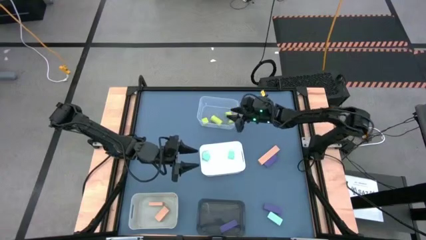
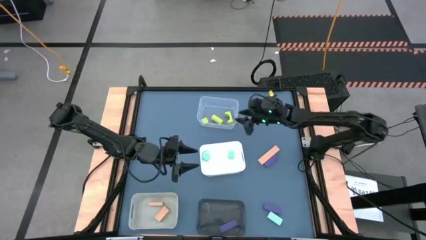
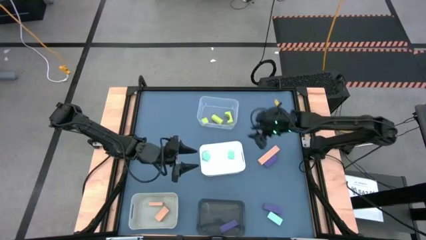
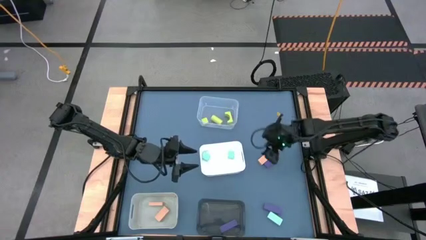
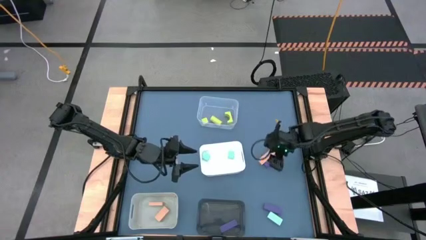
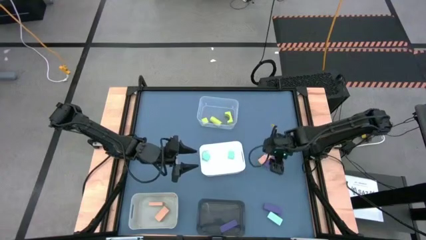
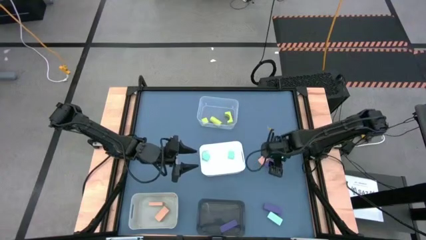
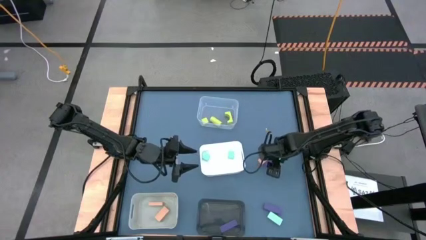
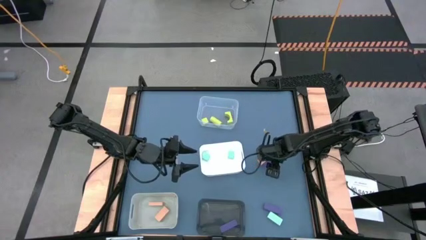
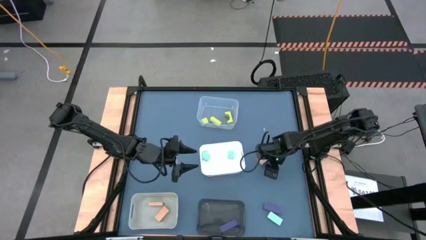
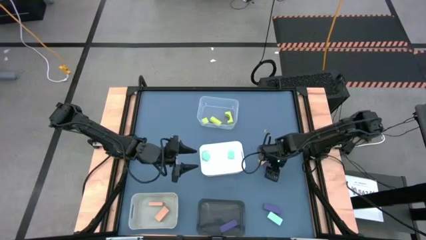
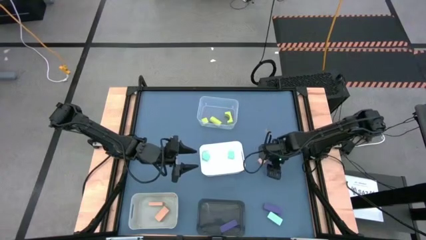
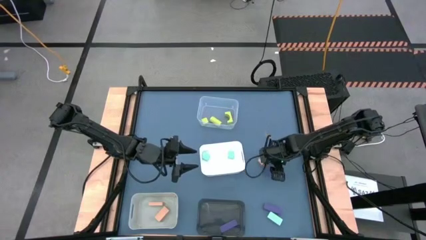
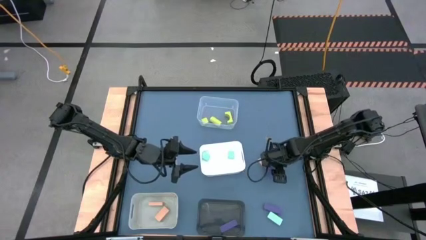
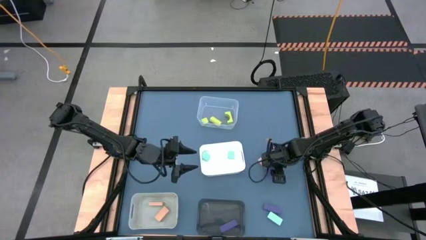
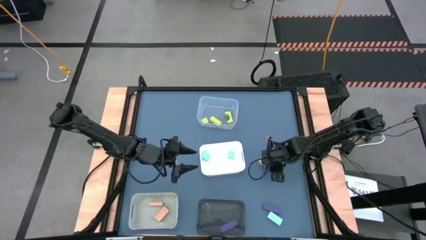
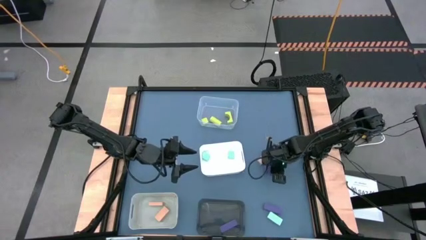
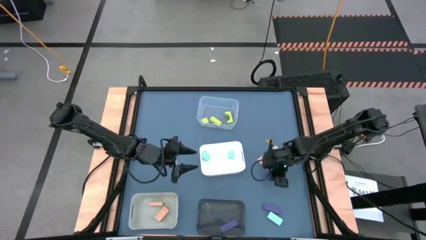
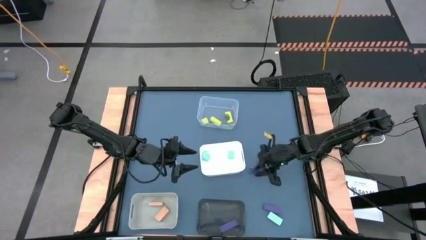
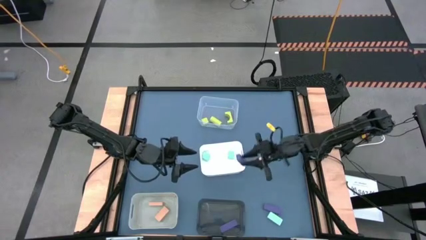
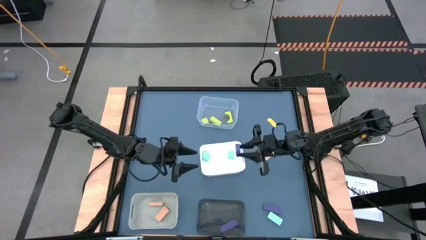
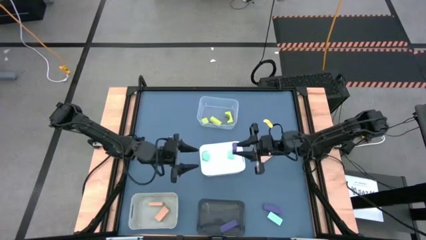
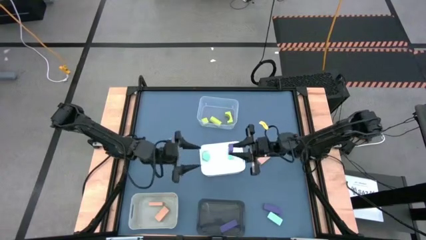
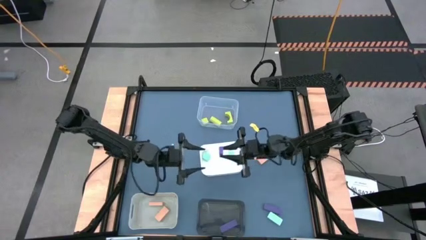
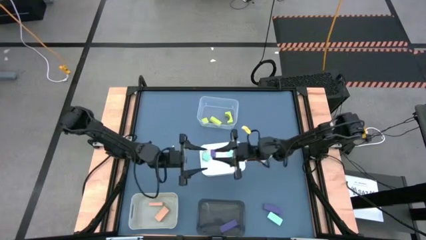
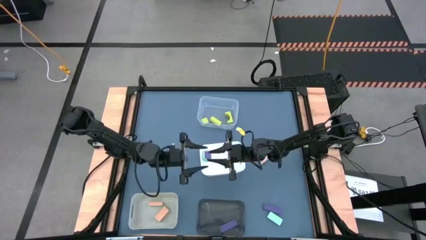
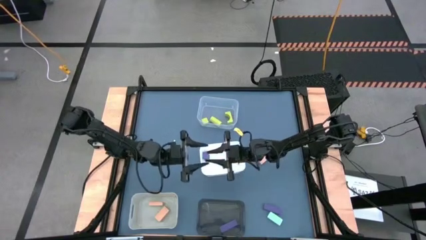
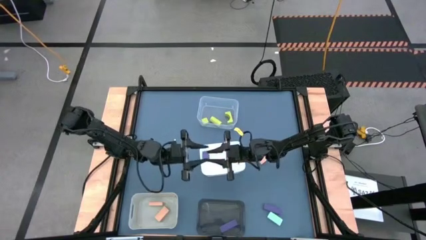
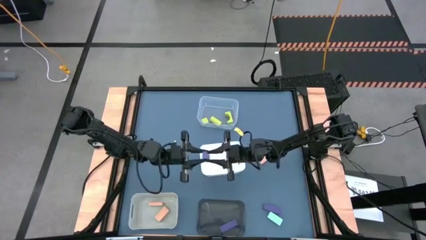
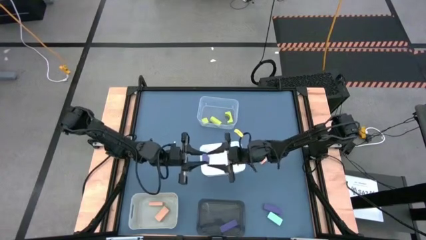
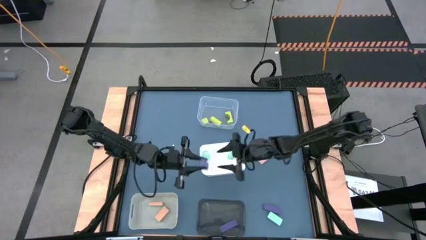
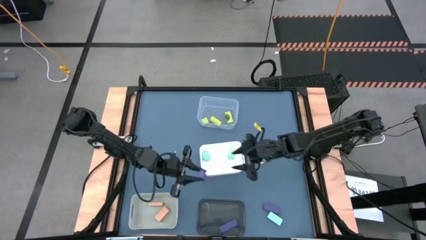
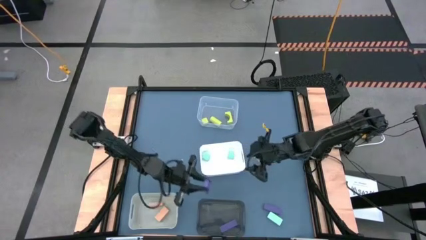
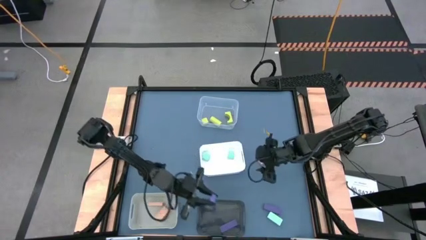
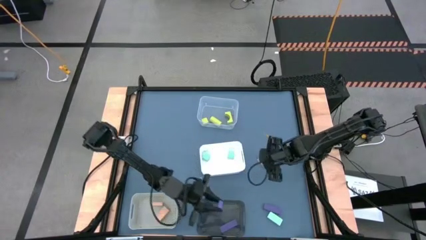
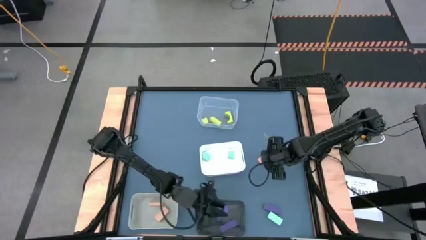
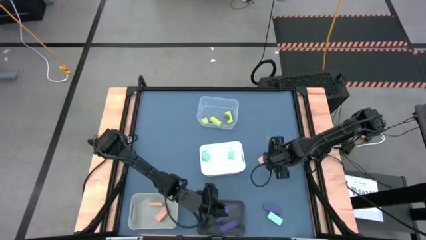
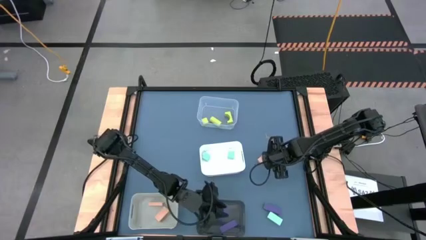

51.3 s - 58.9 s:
Task: Sort & place blocks by color
Put the top violet block into the black bin

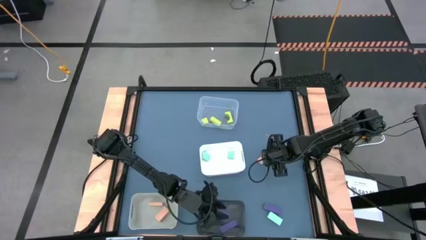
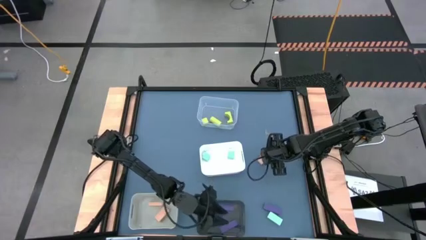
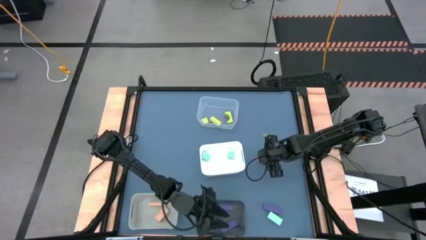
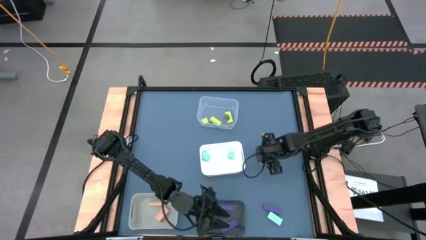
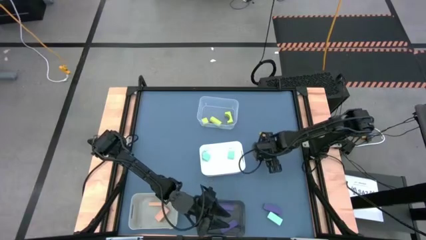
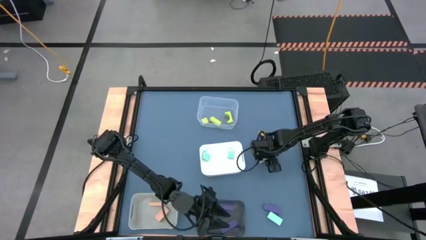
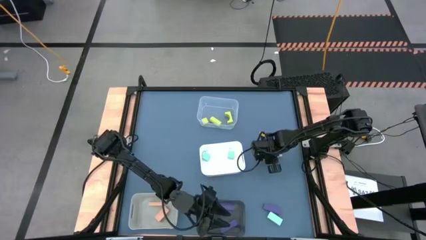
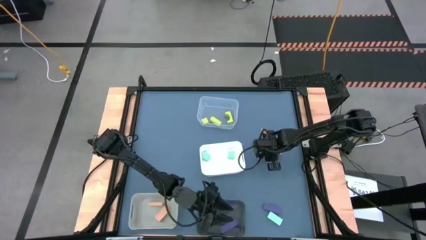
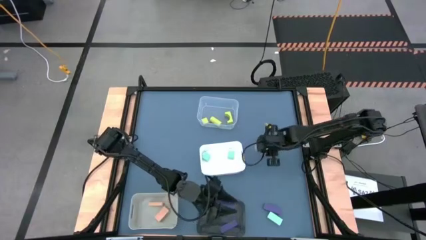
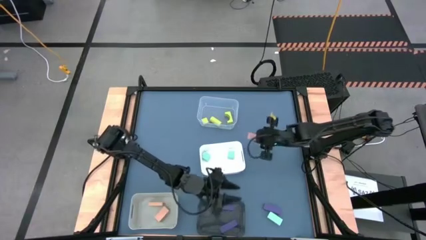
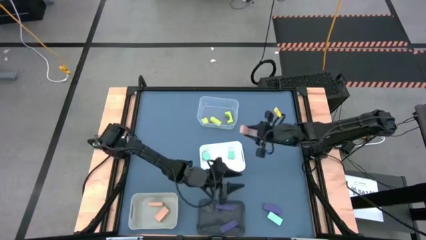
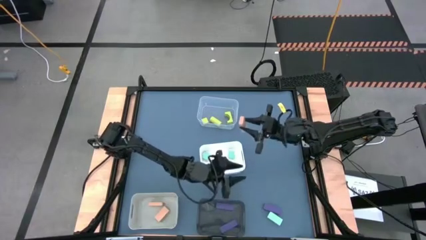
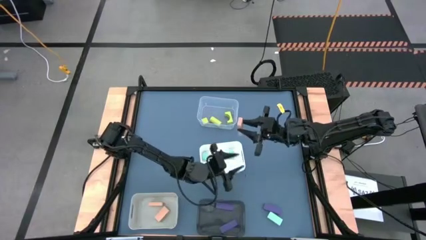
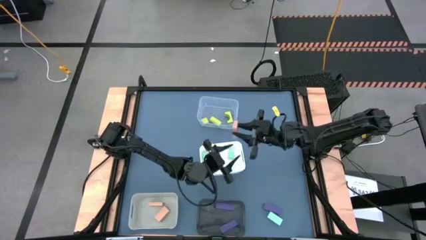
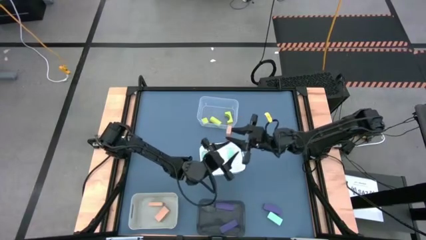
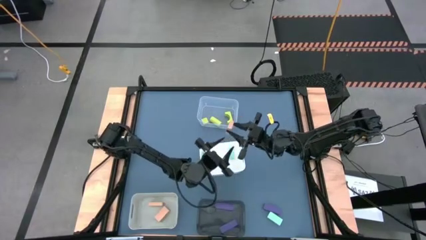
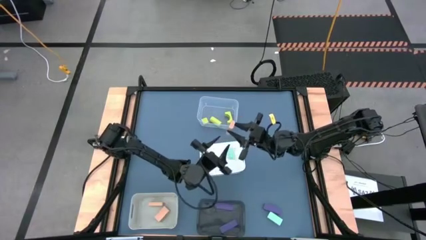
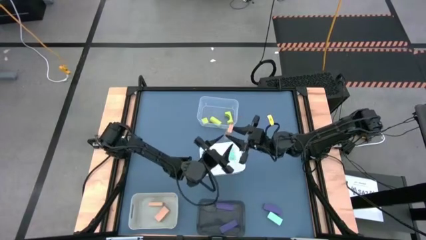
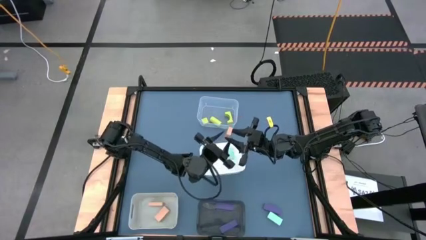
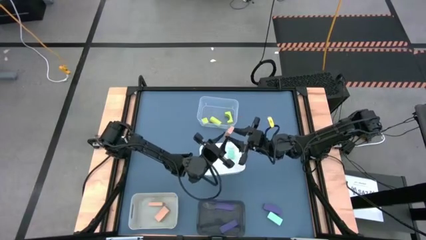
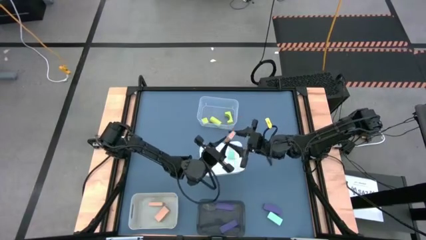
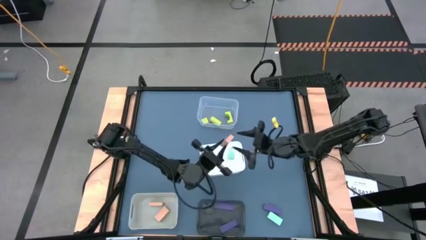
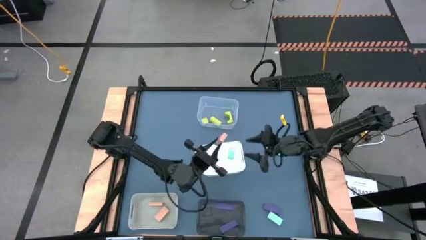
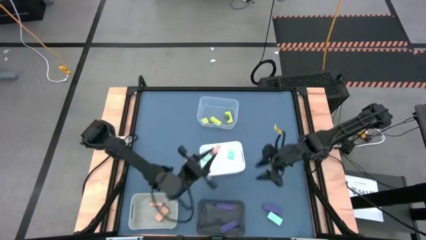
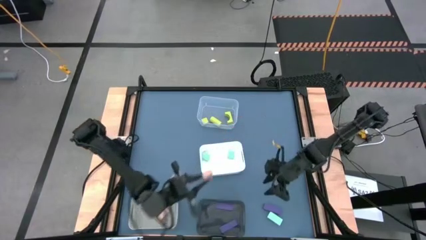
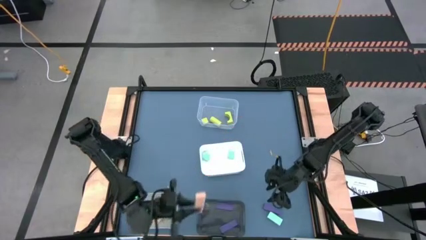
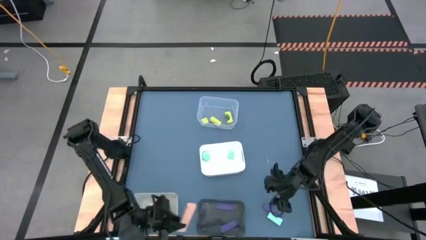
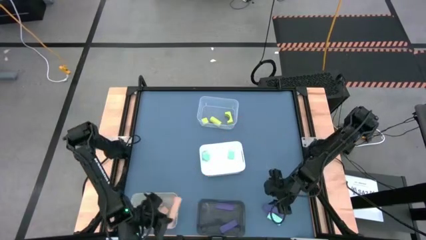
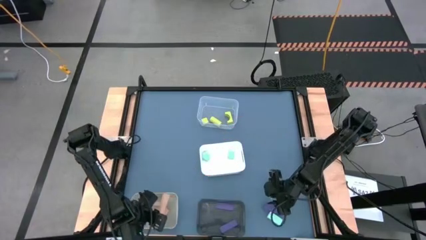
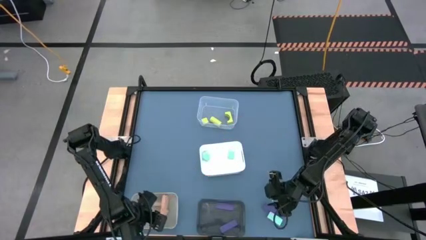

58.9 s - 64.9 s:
Put the brown block into the light gray bin

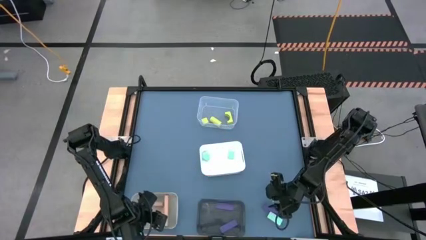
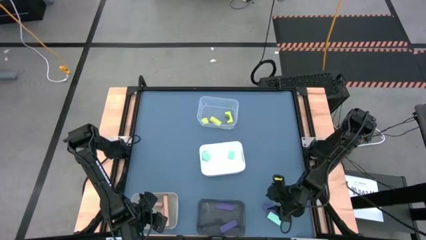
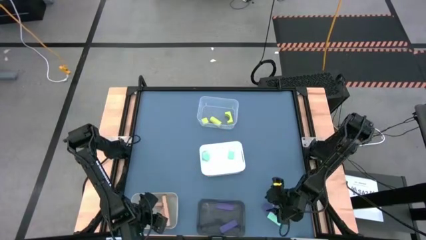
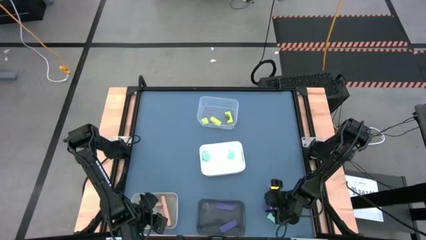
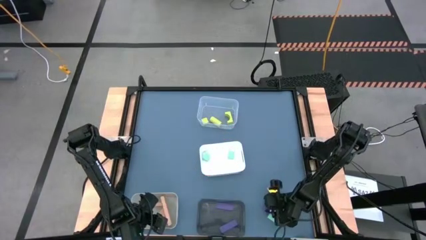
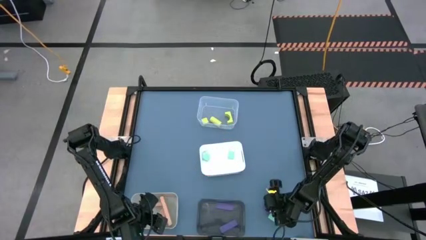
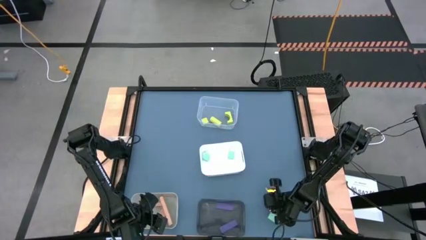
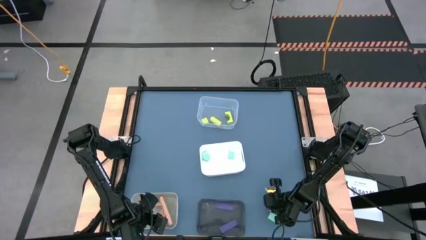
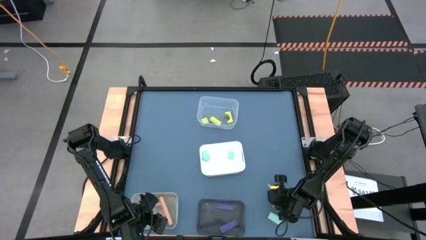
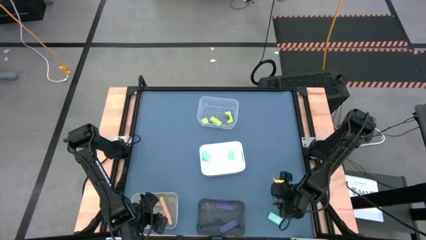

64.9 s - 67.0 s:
Put the violet block into the black bin

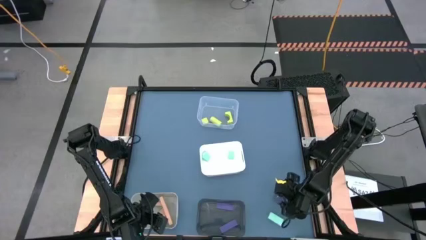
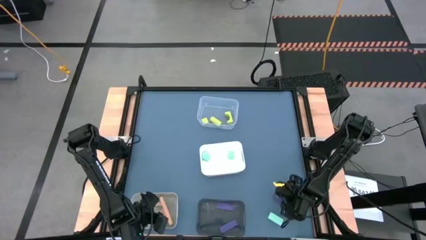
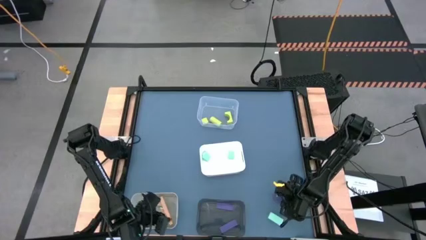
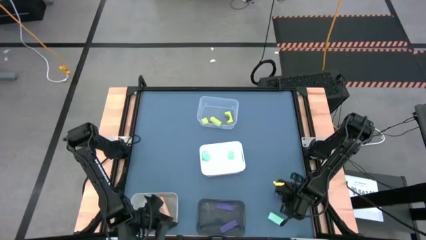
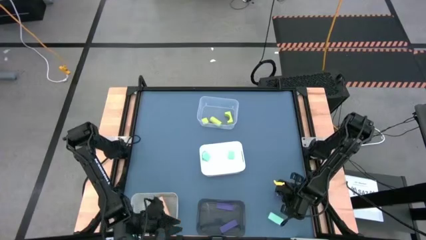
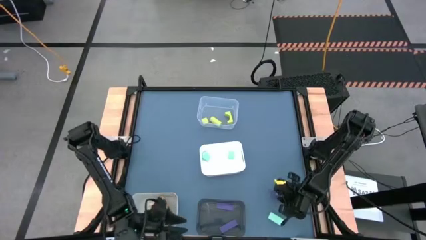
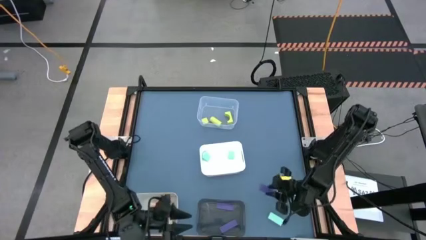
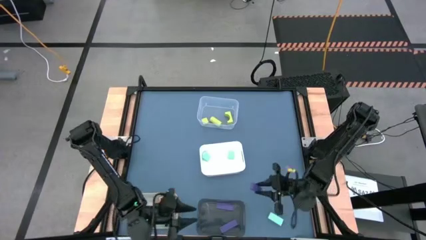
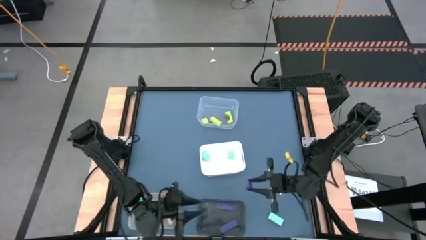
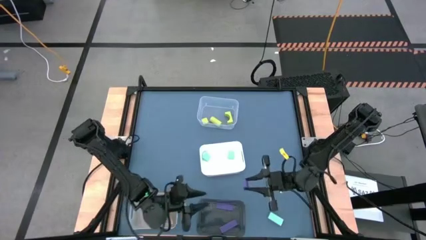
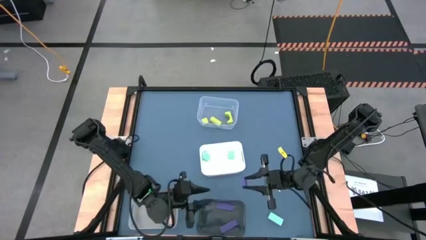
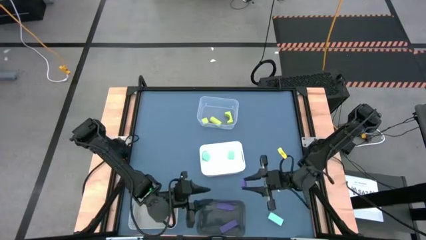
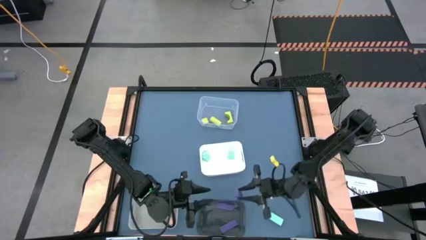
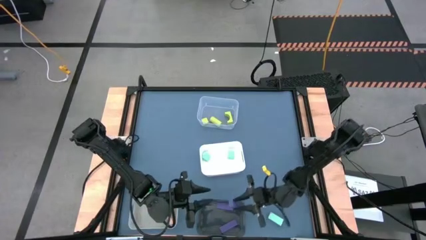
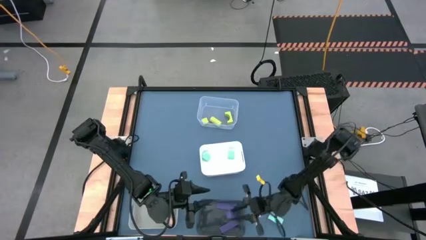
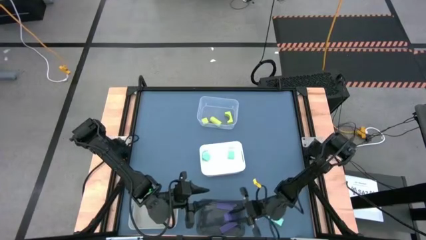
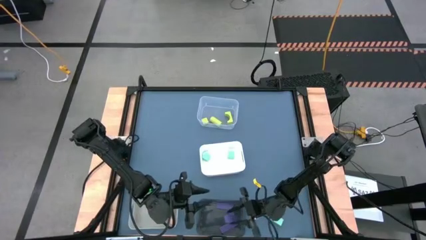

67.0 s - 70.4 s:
Put the violet block into the black bin
